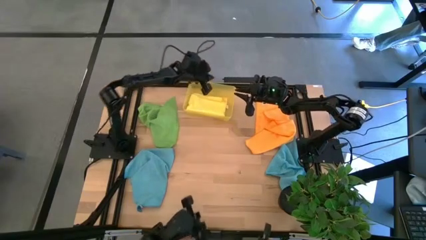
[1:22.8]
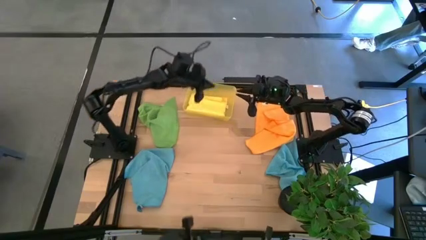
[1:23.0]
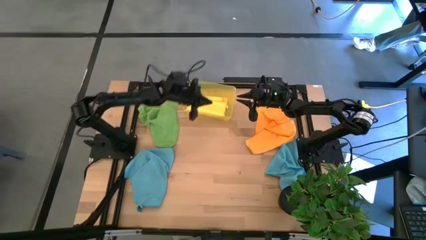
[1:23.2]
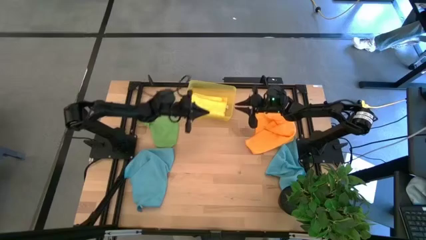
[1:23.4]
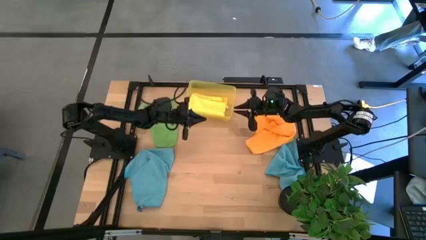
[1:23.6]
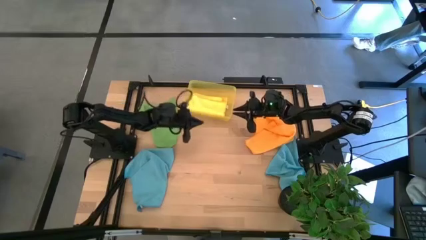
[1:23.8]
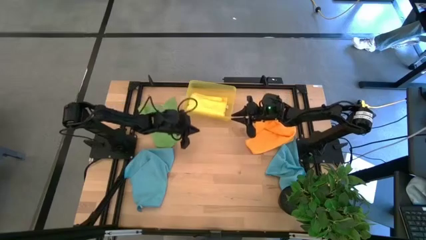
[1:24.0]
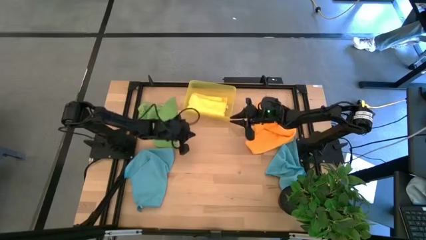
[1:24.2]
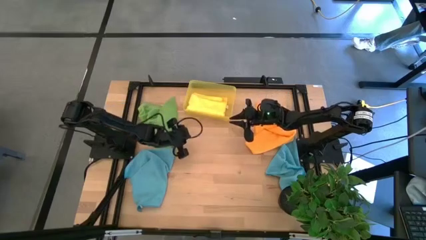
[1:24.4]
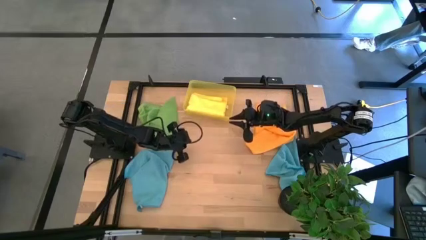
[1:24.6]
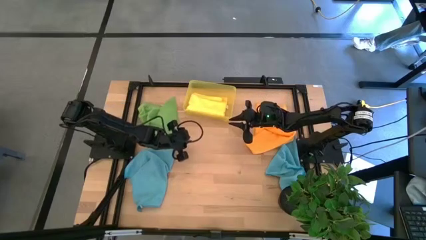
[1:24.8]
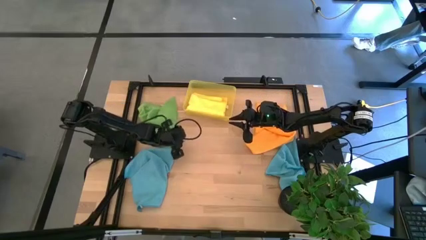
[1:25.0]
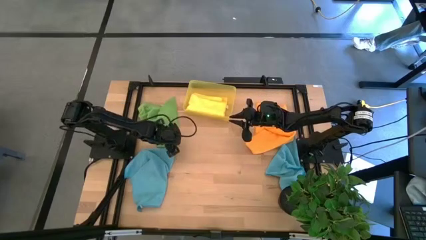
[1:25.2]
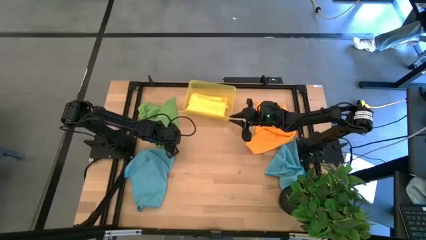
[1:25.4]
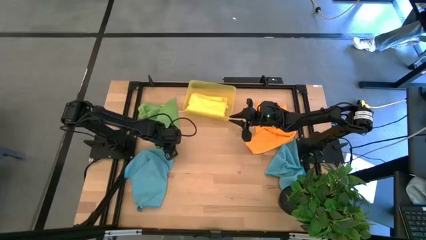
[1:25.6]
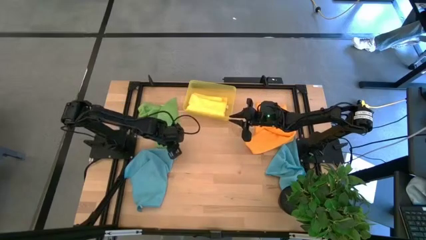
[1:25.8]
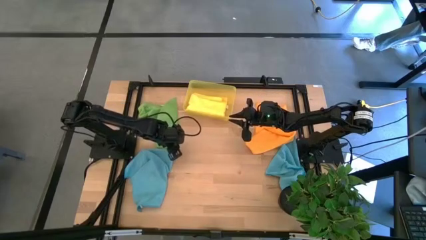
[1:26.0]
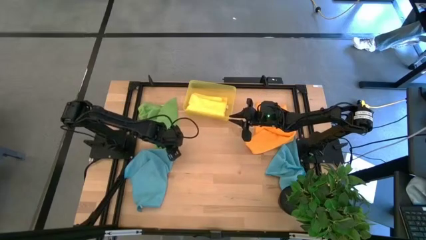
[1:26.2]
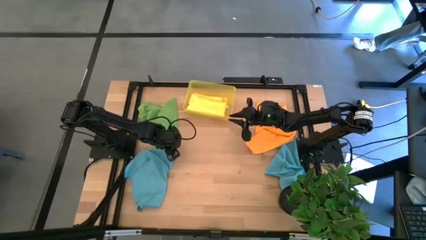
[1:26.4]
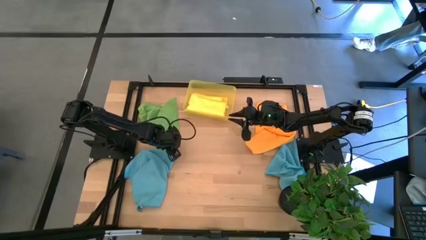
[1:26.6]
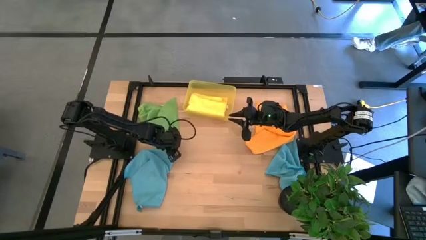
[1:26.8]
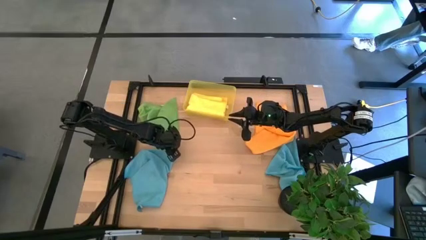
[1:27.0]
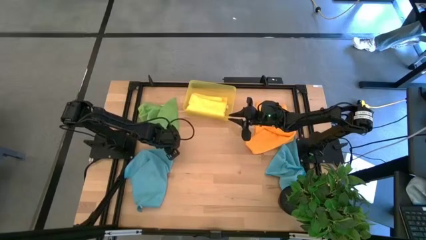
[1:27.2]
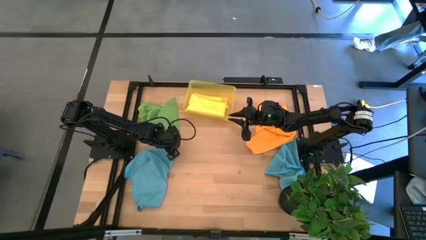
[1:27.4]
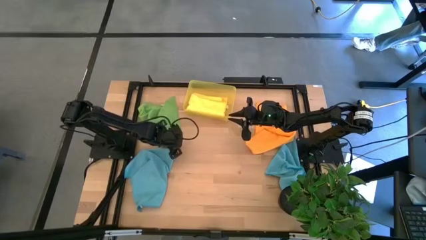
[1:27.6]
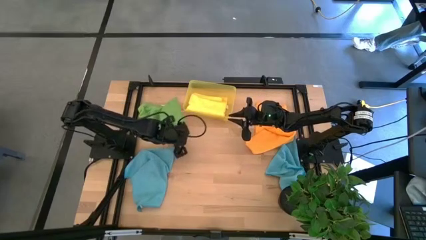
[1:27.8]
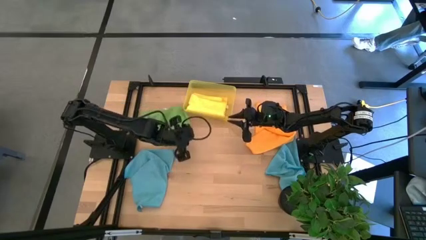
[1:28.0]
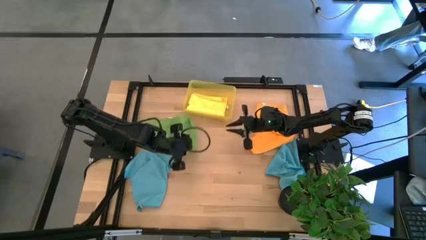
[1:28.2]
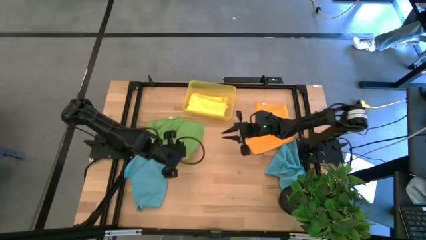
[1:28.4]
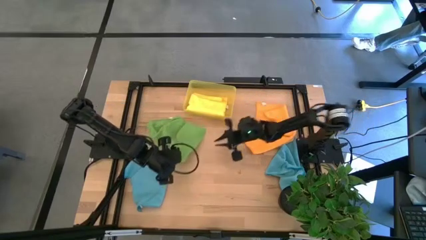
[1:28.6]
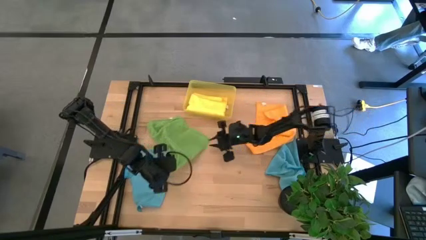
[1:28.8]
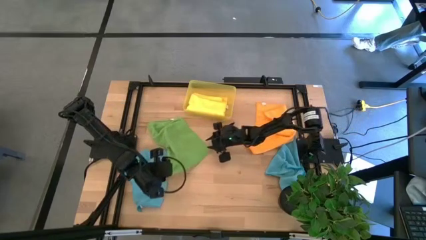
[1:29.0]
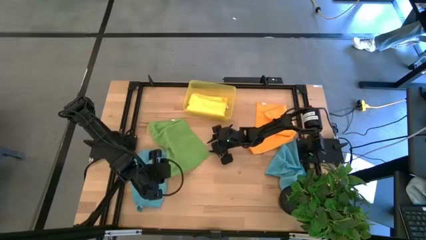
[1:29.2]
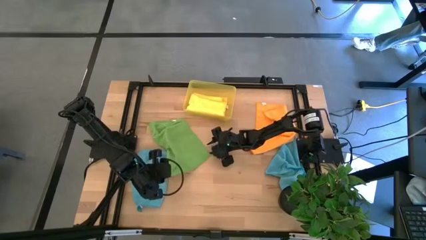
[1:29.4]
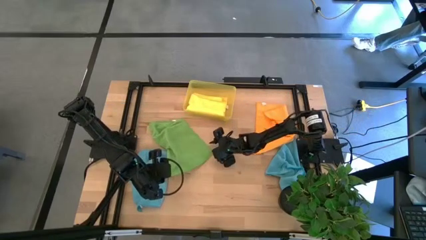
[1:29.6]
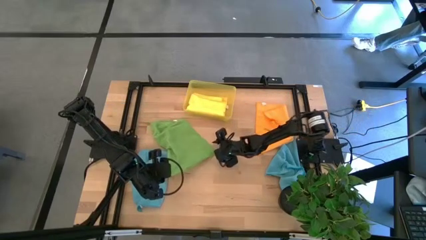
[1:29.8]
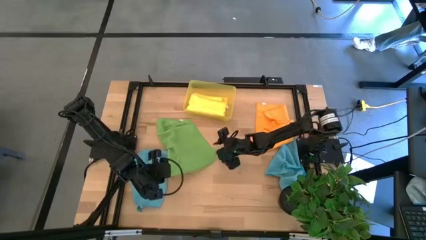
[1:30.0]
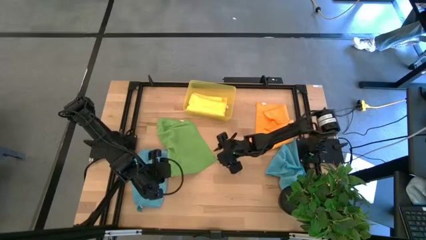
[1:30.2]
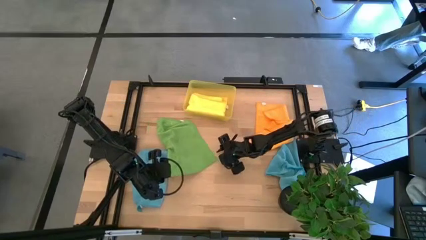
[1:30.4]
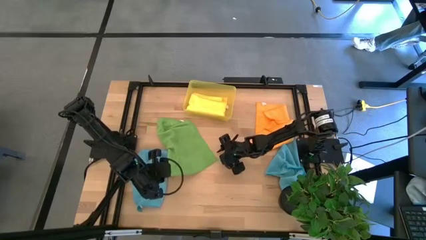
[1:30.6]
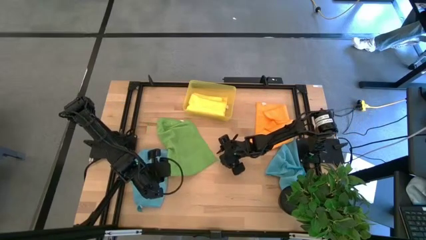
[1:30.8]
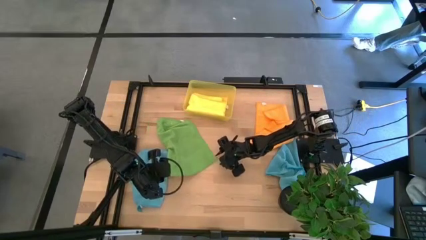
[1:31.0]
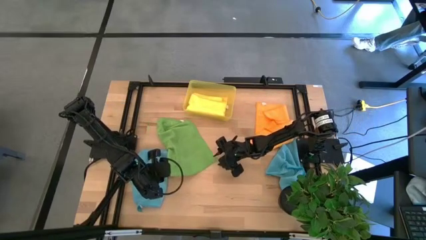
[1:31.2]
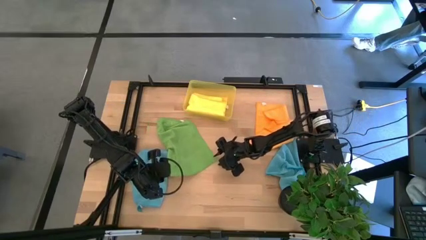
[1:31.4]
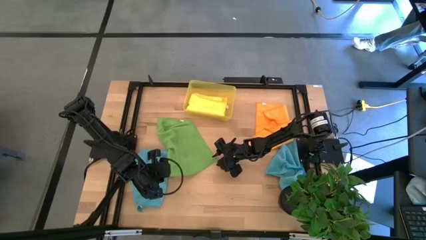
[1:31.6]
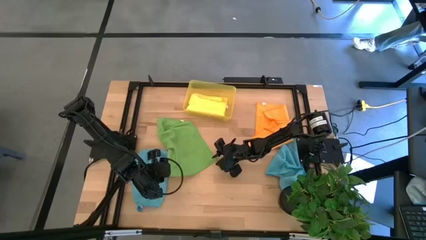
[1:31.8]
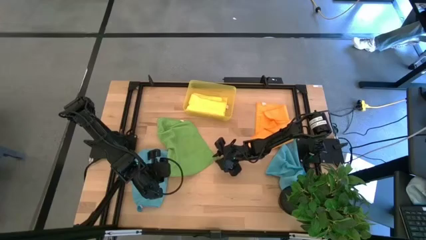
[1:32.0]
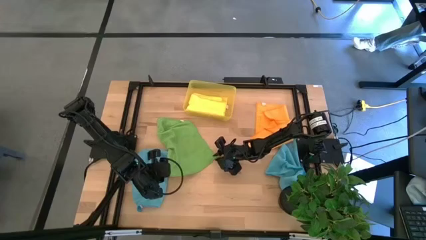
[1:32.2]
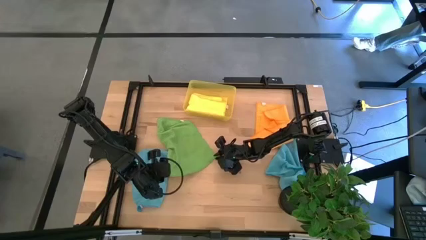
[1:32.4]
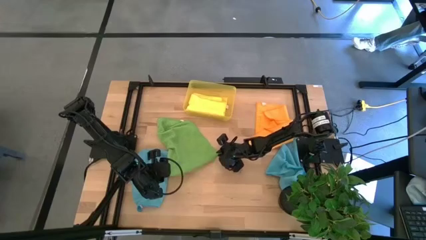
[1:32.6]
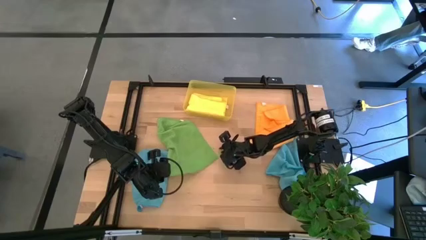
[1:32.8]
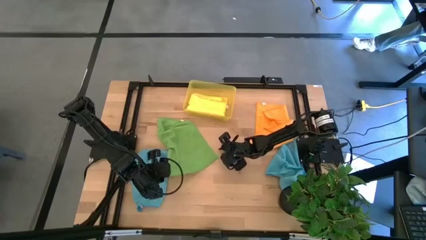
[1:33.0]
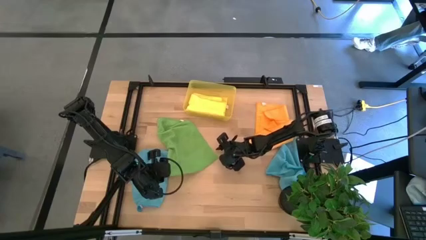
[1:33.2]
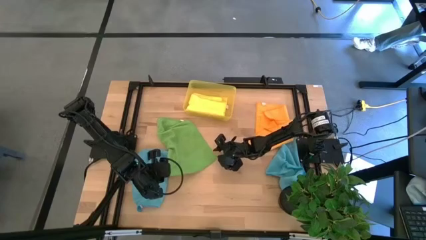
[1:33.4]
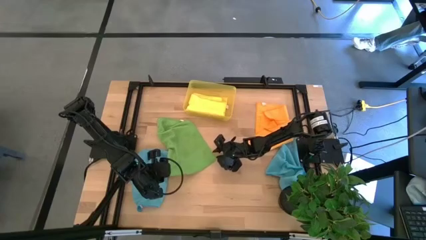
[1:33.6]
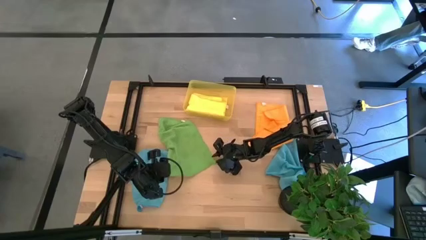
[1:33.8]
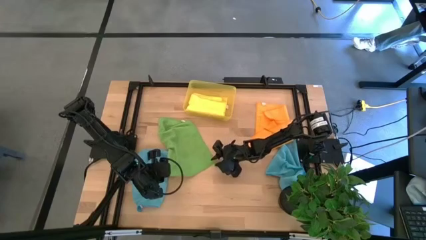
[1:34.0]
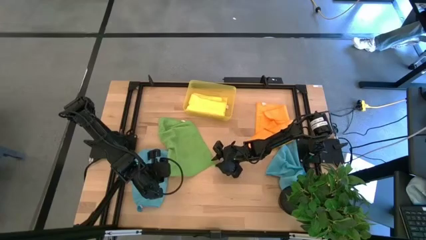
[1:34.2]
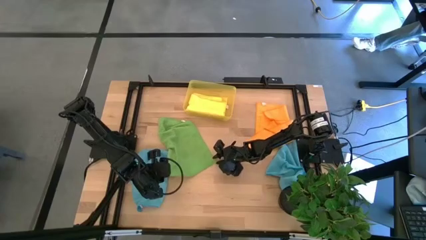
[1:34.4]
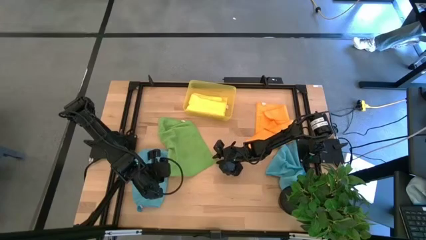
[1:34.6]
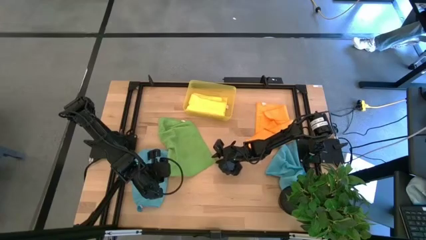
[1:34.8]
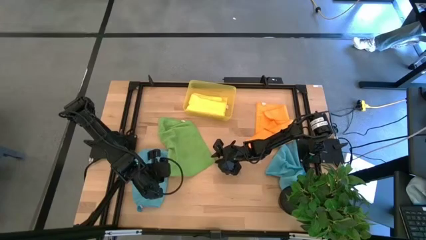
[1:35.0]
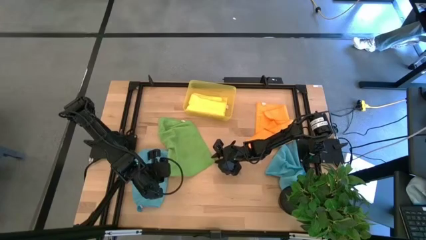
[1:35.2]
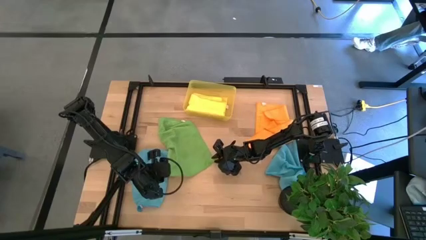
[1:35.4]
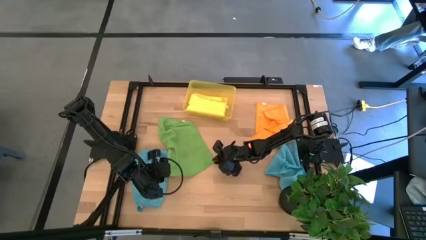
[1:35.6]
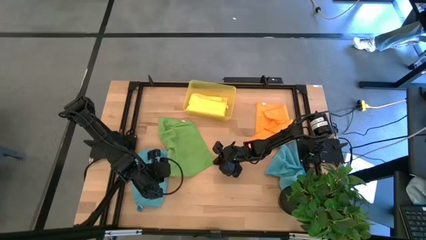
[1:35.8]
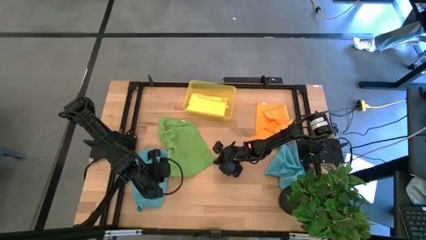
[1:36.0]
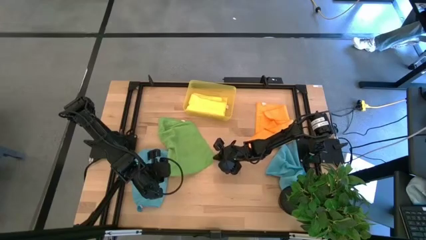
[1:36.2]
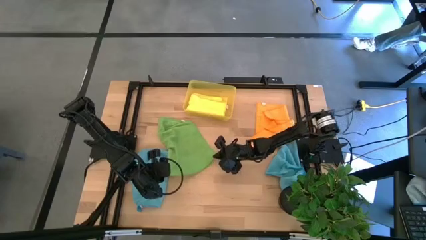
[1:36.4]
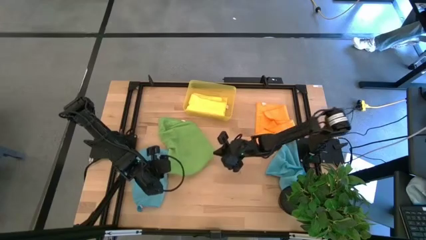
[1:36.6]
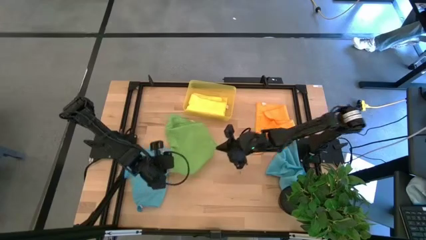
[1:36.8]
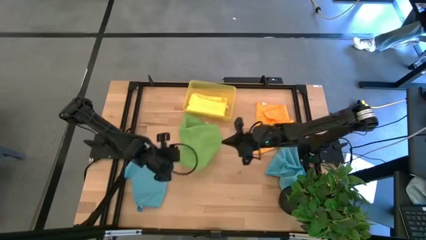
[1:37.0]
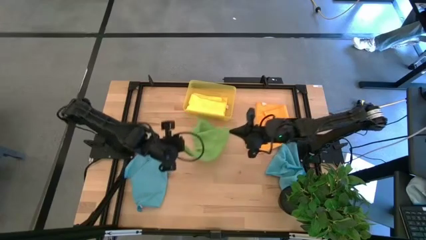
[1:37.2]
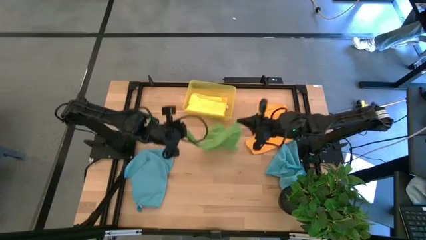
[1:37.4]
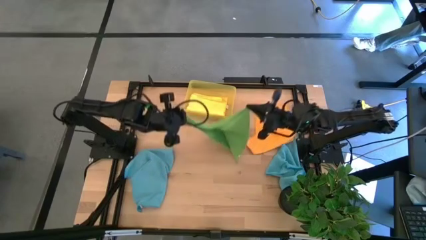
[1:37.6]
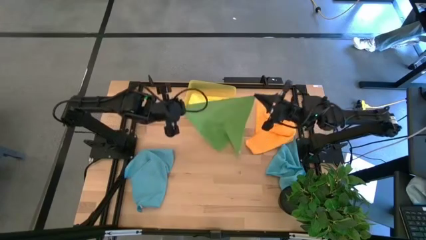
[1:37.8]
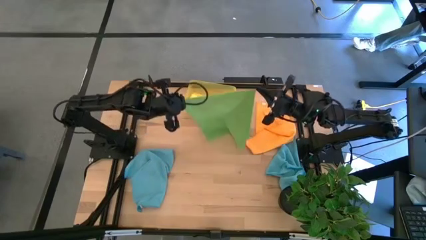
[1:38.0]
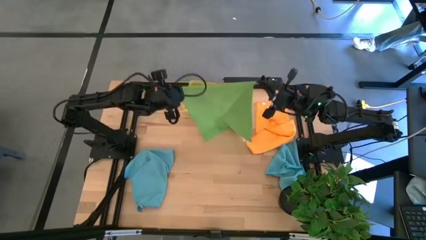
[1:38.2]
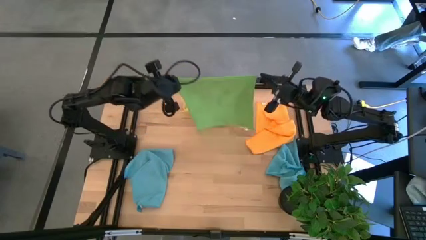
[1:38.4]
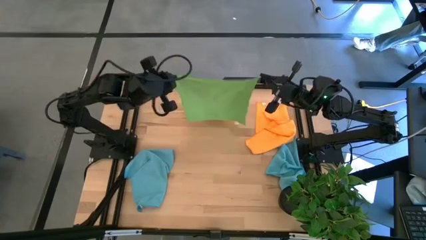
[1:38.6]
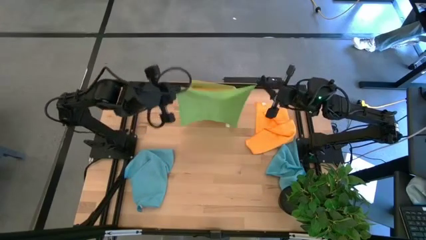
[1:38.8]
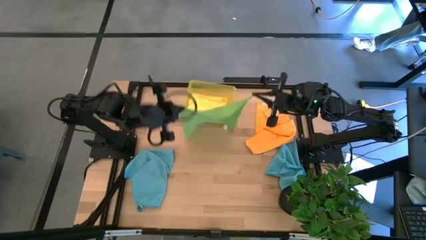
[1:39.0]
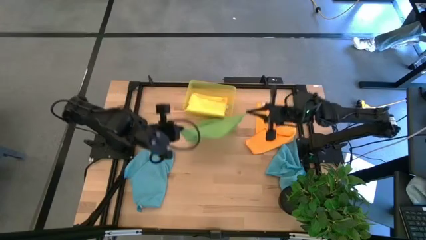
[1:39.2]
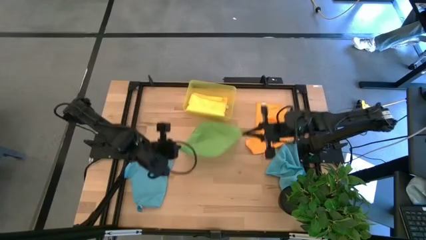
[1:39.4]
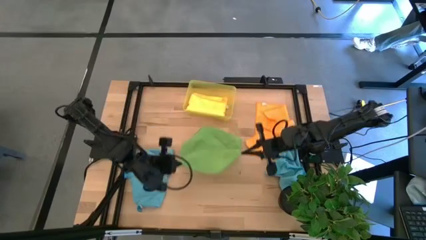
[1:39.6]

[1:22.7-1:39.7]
Task: Fold microfiber towels
Fold the green towel
